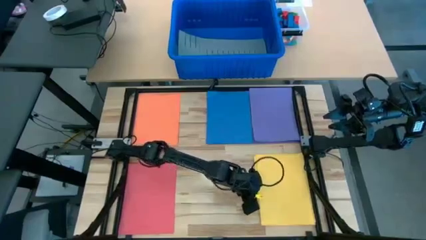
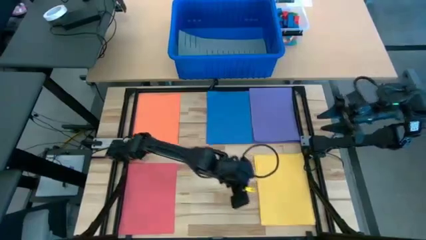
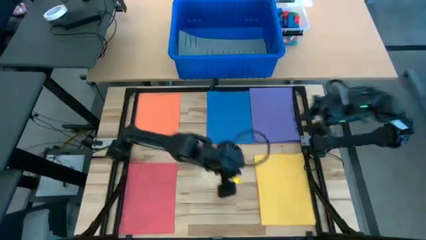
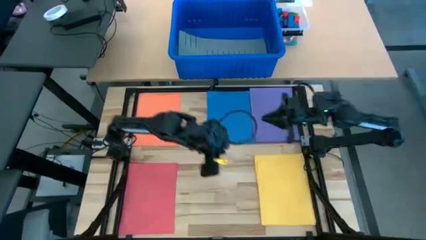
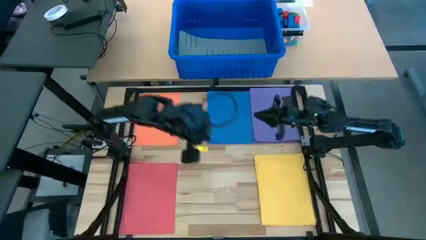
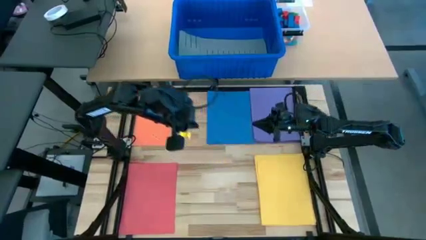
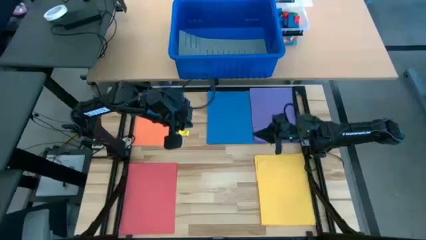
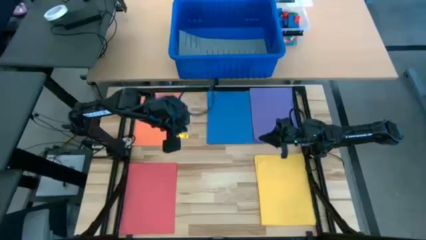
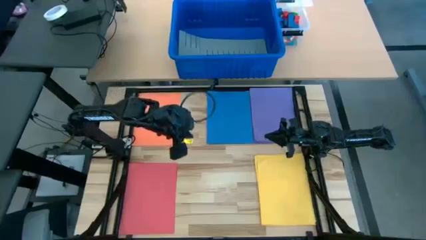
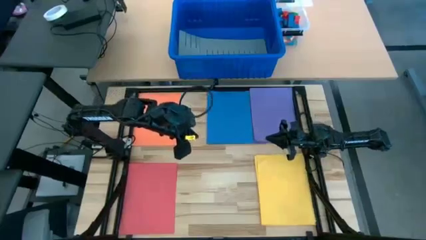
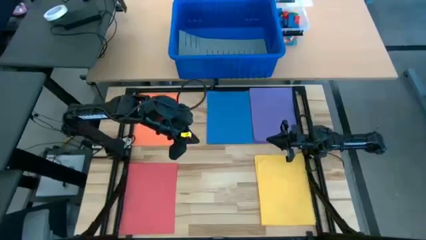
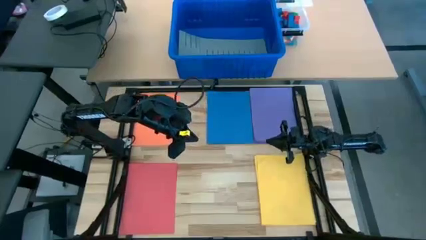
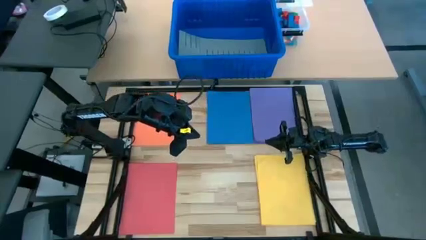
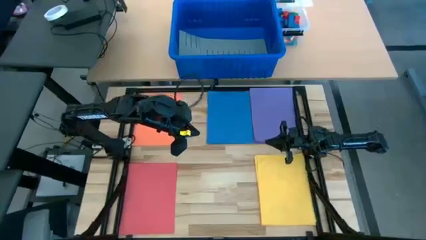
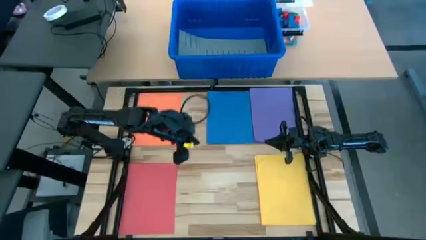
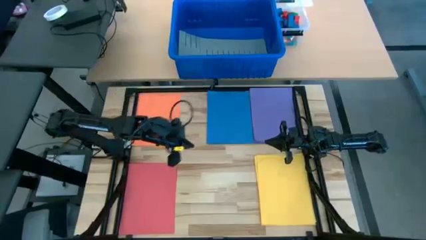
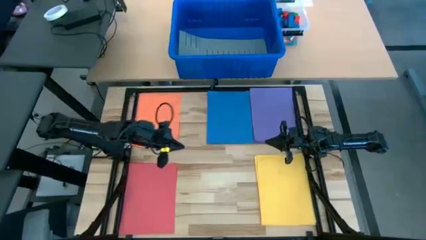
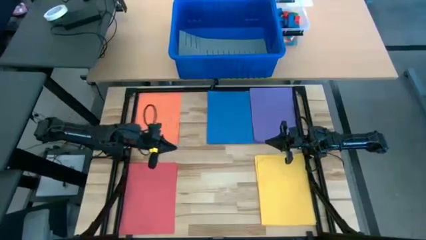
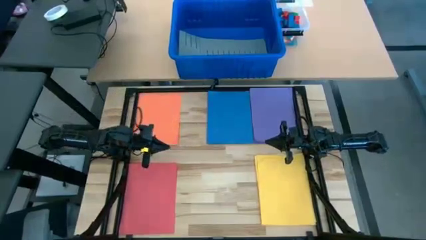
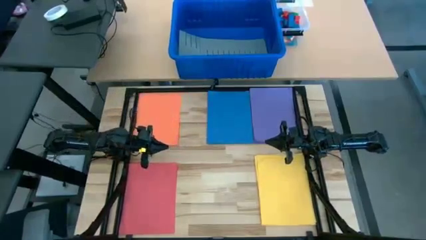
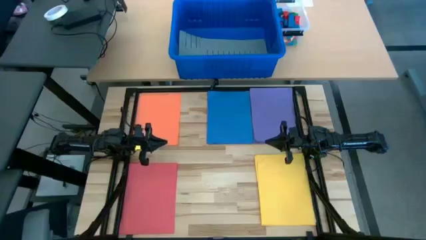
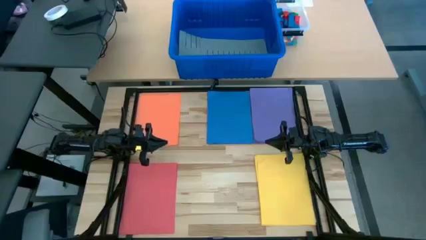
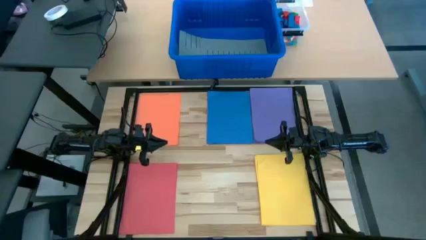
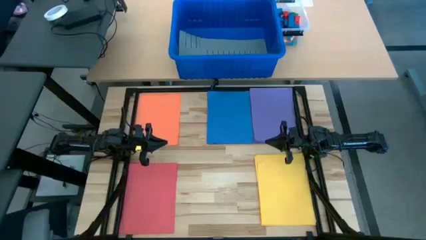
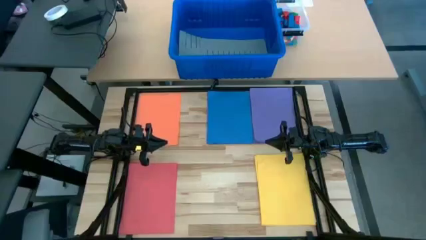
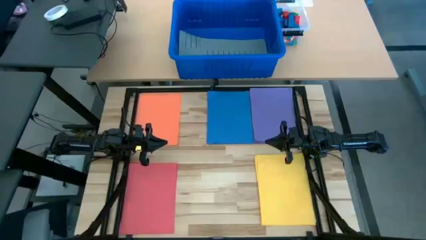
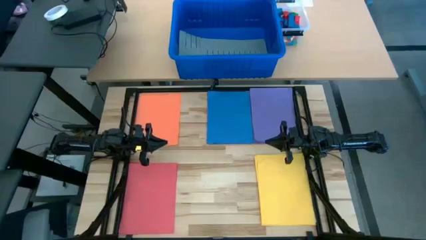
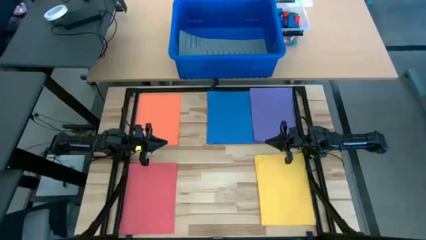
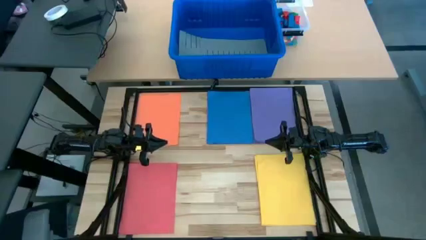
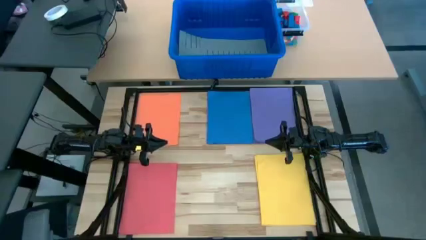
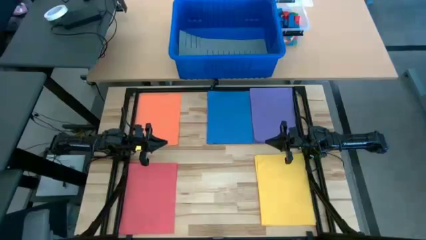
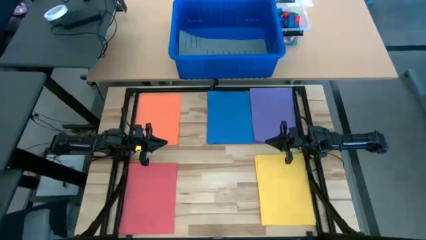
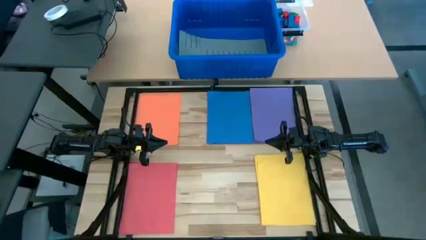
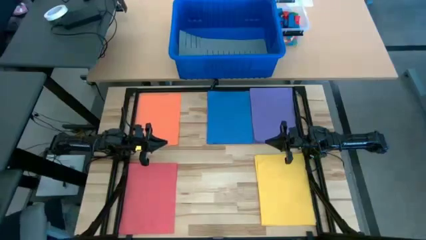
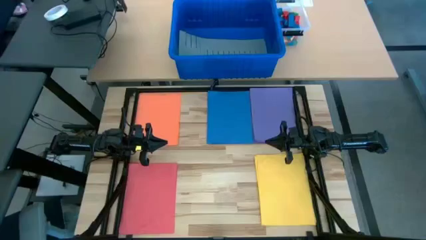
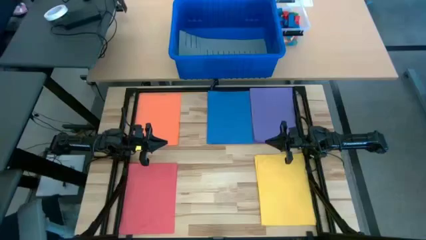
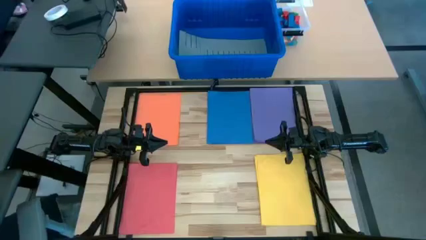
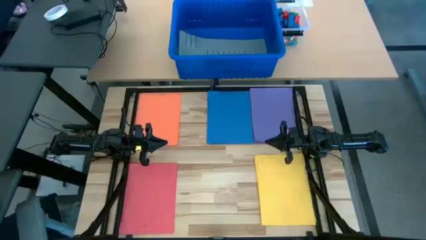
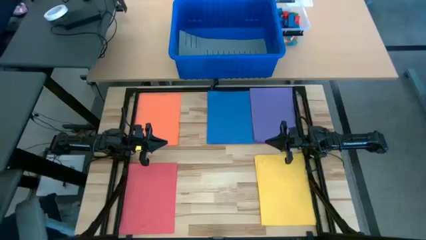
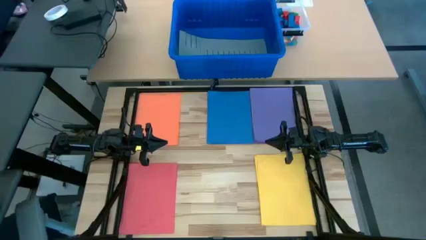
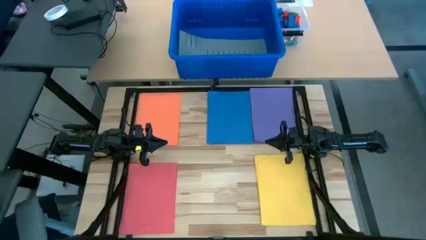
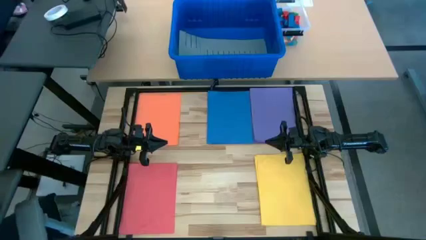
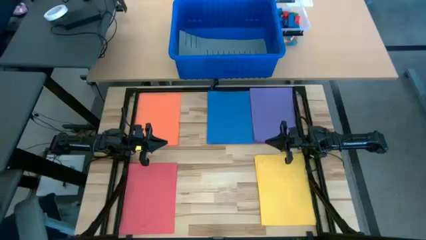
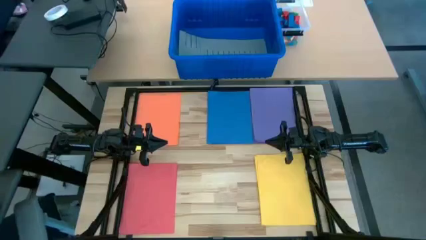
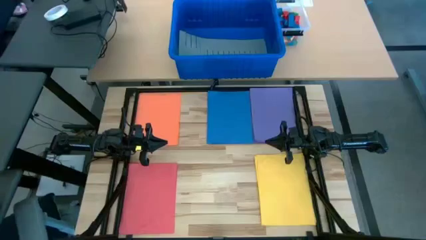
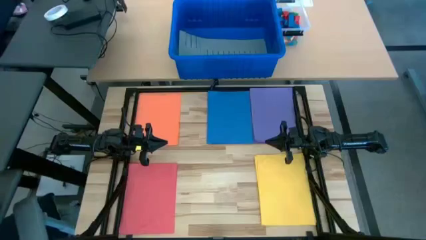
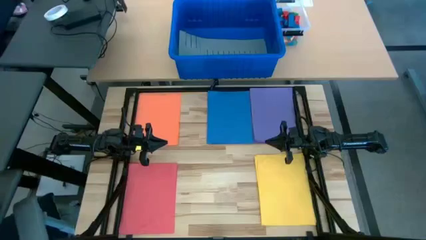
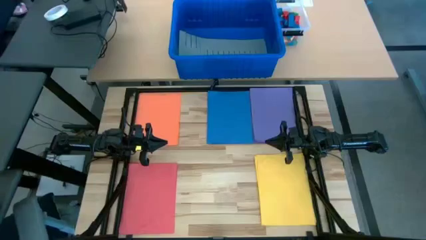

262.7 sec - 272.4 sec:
Task: Organize paper
Return to Home Position

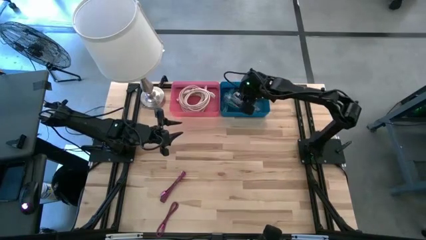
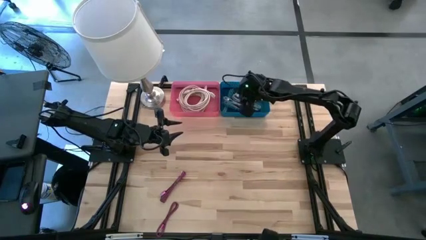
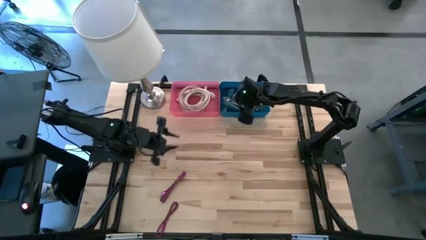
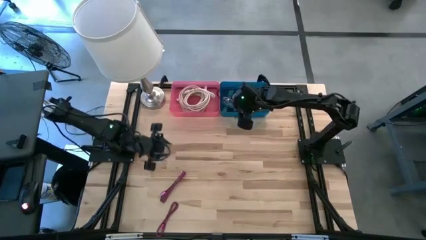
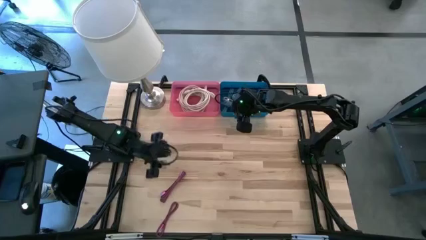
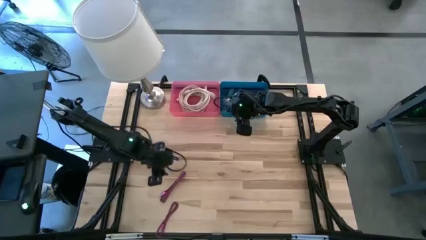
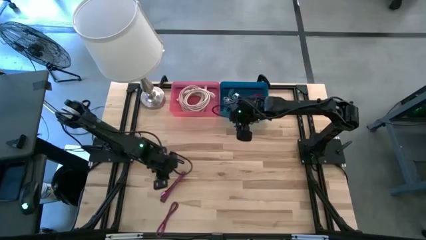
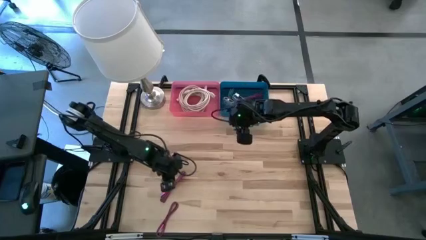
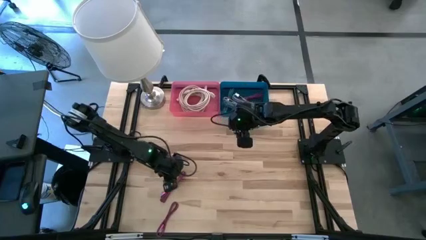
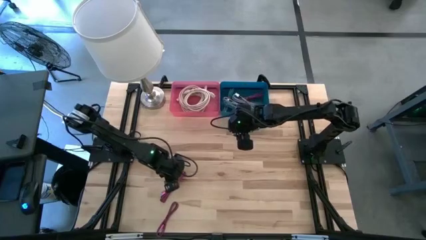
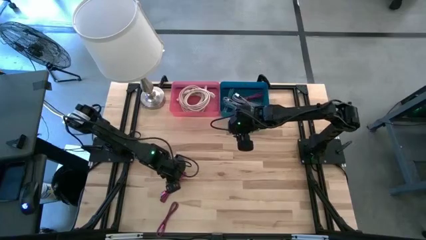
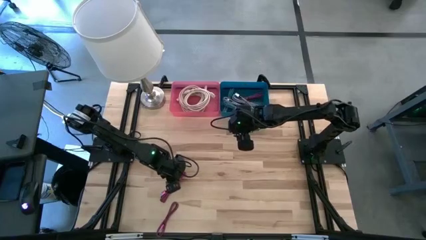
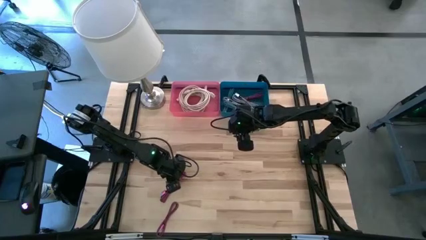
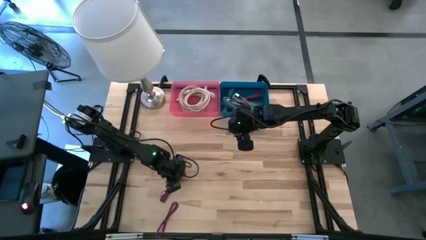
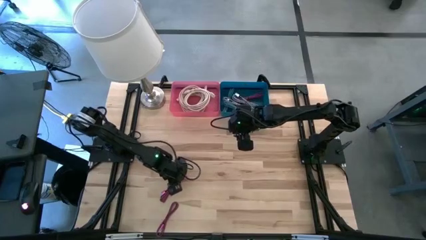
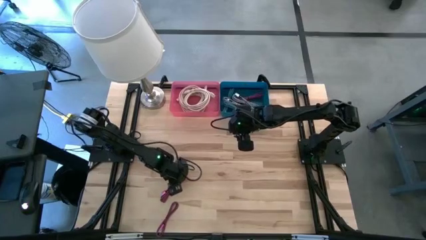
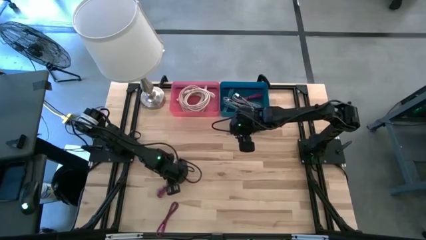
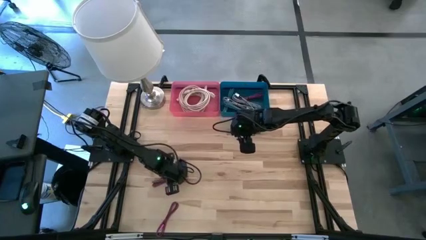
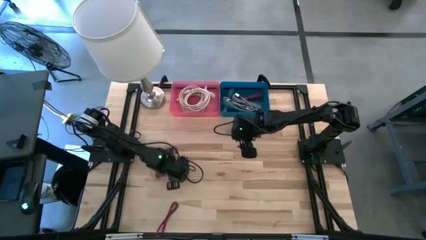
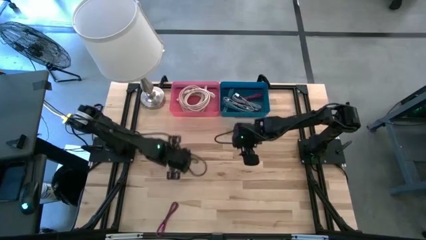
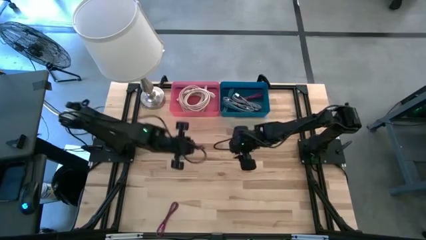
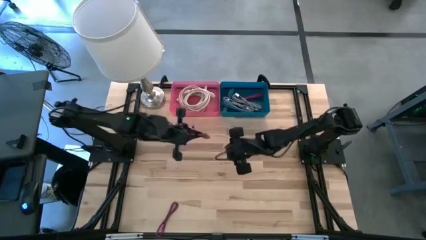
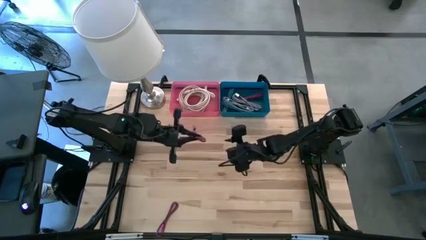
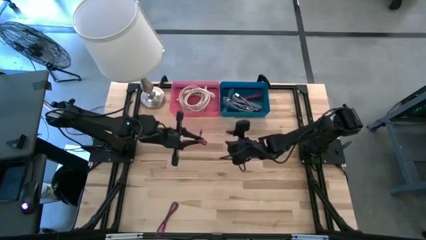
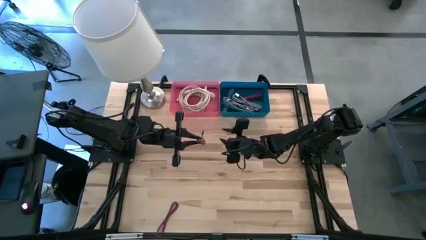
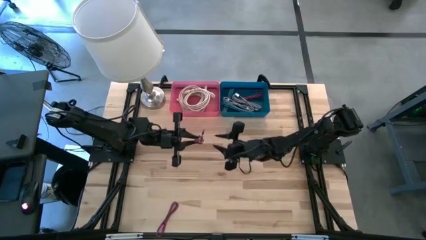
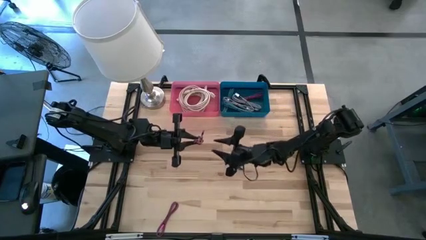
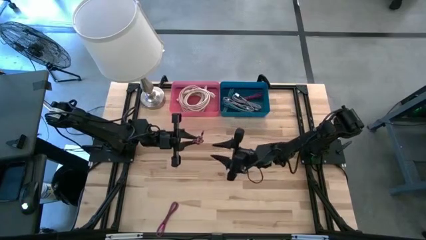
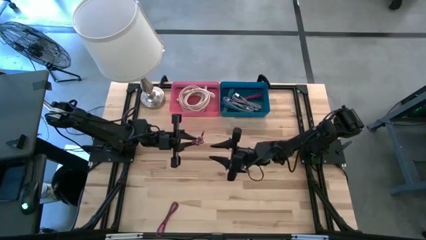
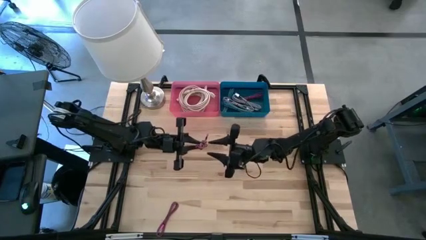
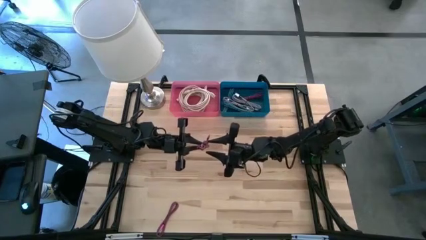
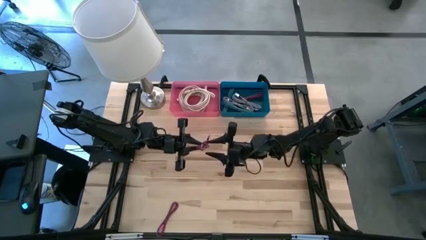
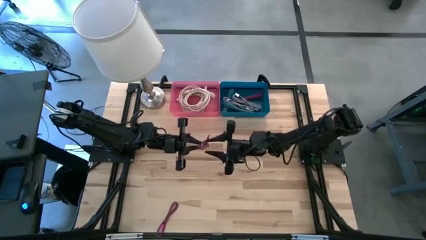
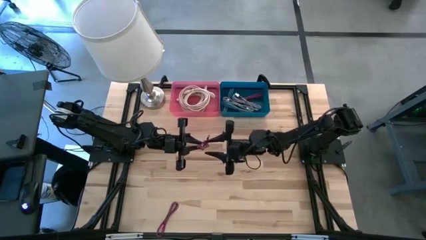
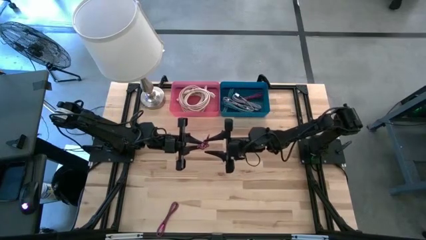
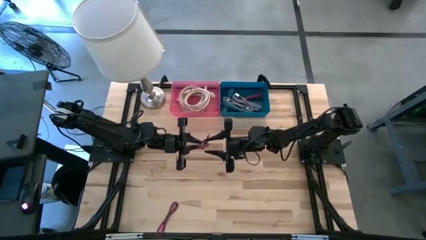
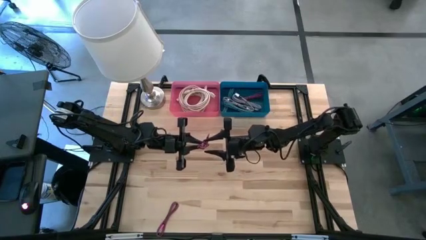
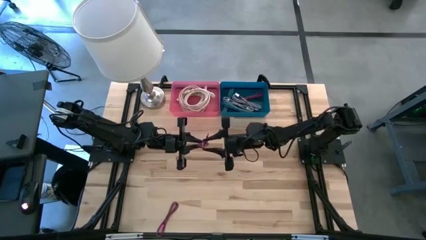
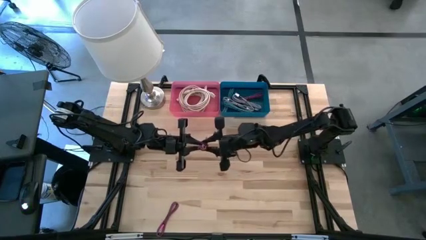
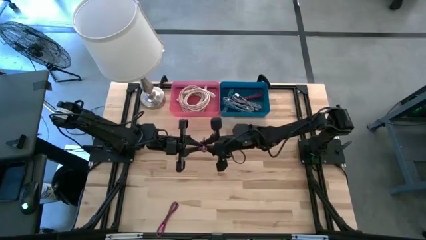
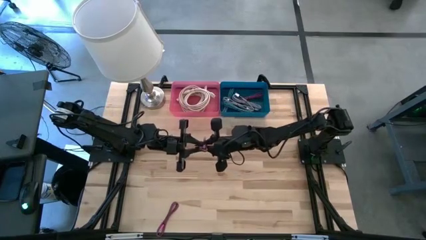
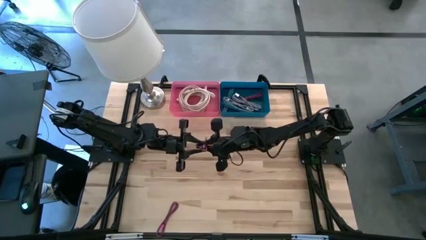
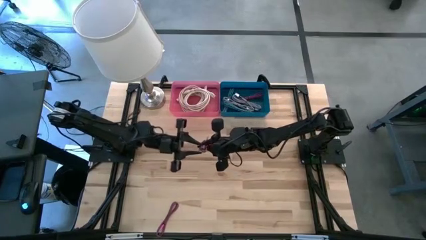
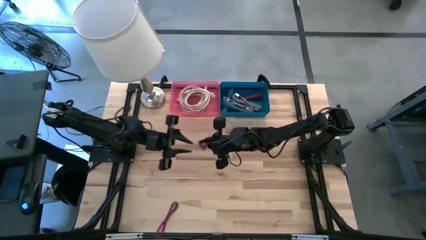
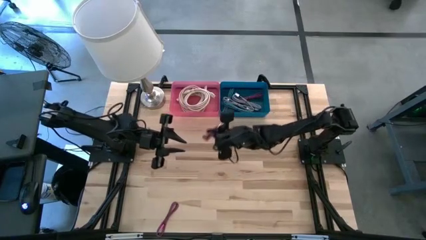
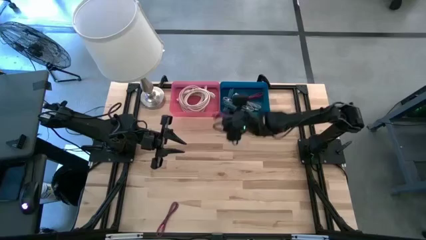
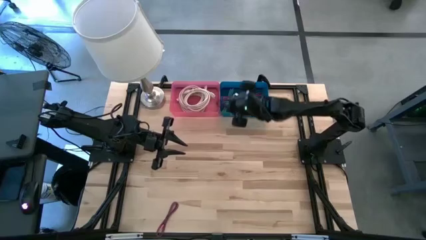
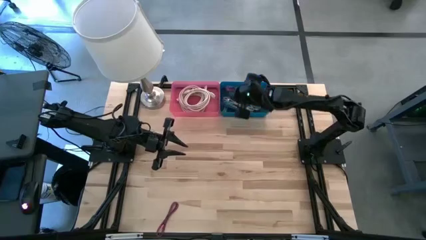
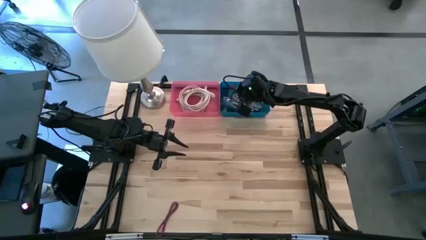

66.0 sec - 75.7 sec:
Task: Pick & Place USB Port
Put the top small black and pink charger cable into the blue bin
